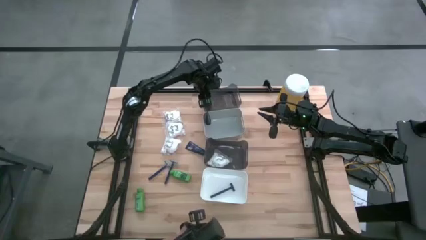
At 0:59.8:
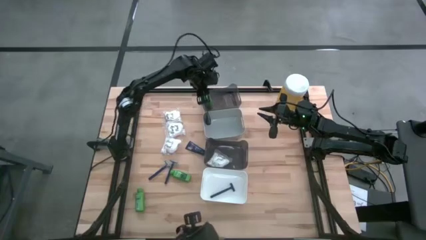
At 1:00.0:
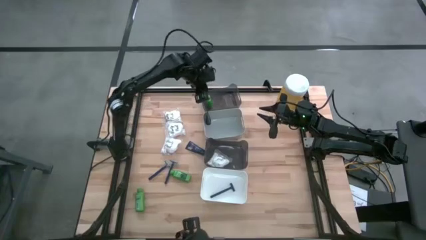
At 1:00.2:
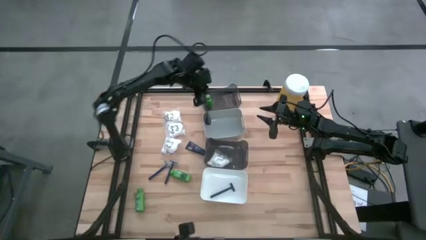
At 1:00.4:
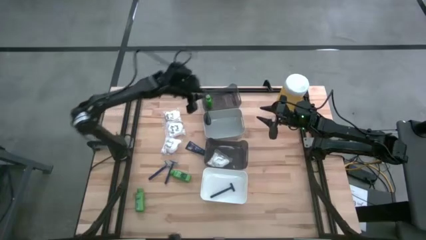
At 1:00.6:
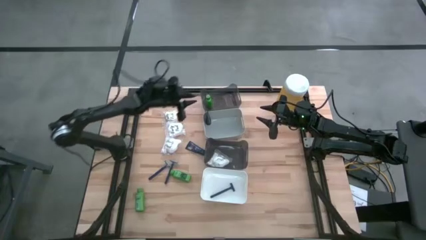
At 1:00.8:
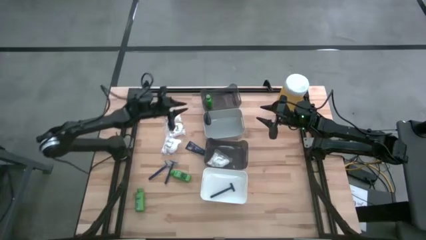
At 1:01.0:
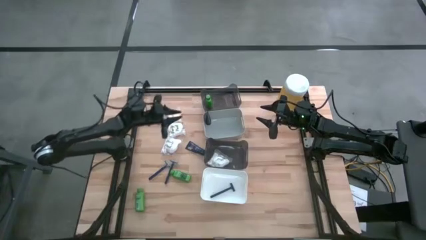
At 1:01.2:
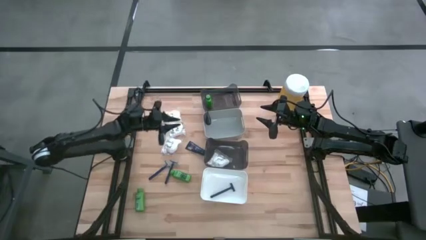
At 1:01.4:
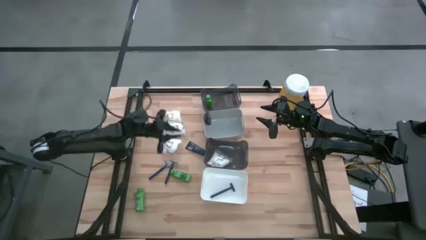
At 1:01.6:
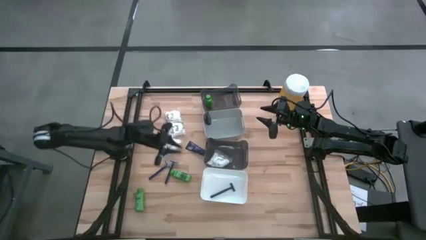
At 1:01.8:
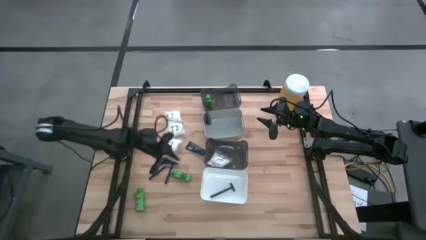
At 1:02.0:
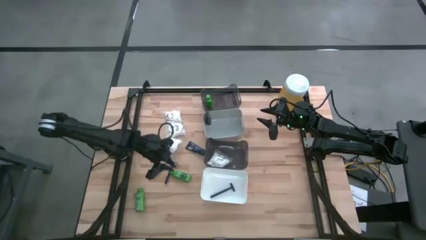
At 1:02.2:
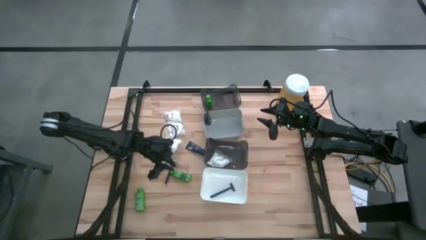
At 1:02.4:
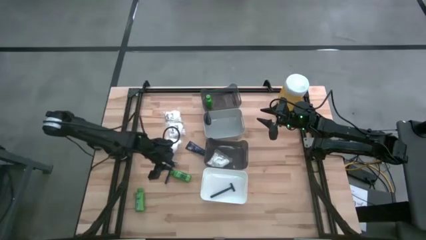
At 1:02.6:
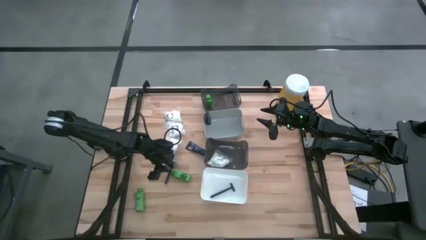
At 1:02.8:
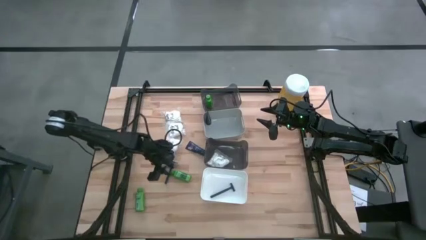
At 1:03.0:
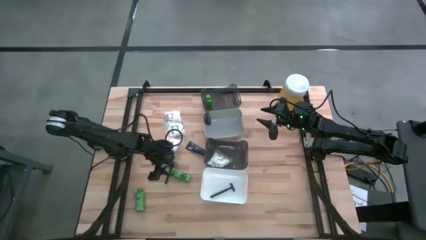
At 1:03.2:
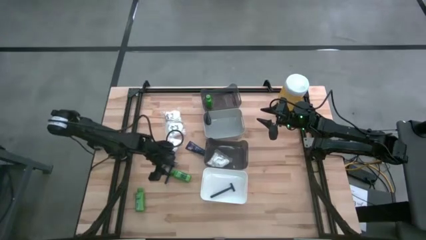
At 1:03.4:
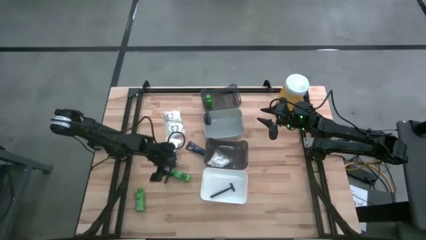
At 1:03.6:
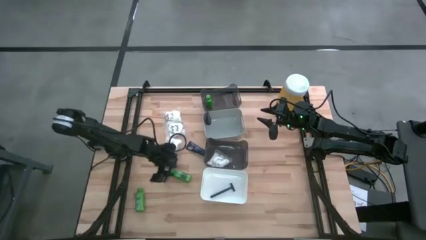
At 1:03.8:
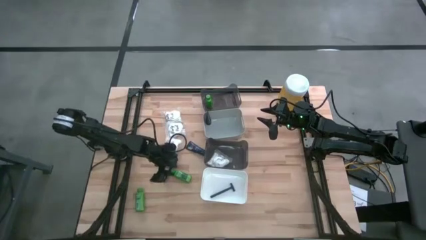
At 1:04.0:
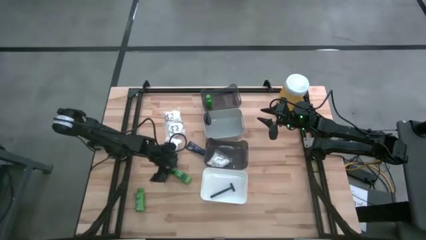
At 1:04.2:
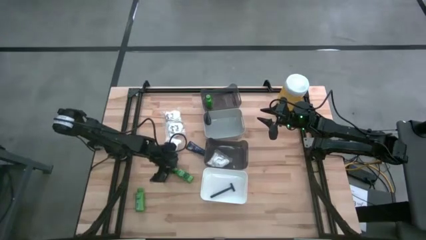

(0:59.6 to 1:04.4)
Task: Pick & Place Travel size toiletries
Put the right green shampoo into the top black bin

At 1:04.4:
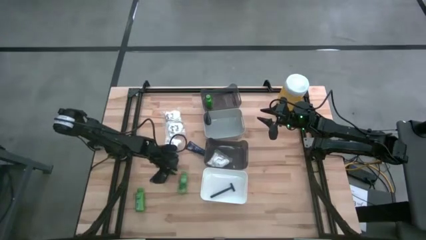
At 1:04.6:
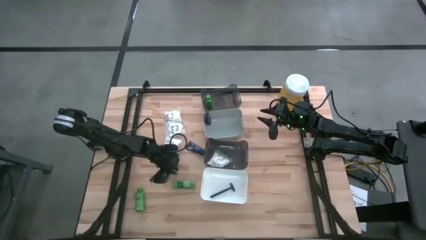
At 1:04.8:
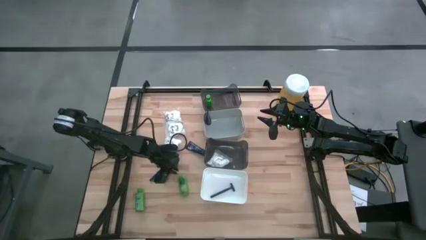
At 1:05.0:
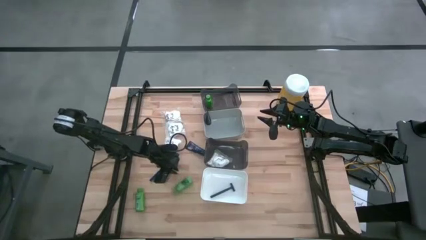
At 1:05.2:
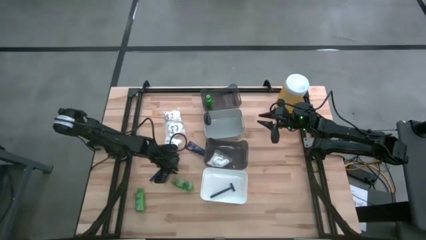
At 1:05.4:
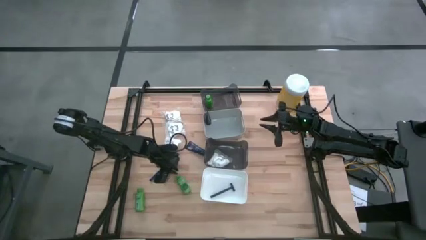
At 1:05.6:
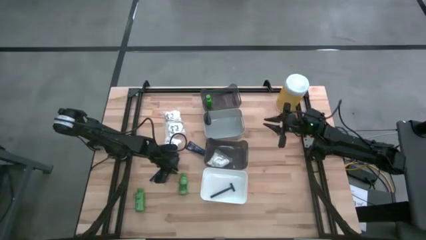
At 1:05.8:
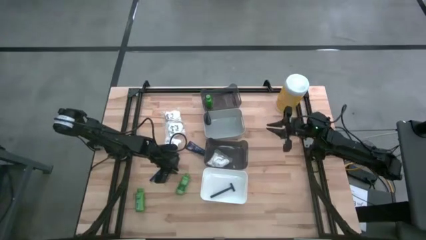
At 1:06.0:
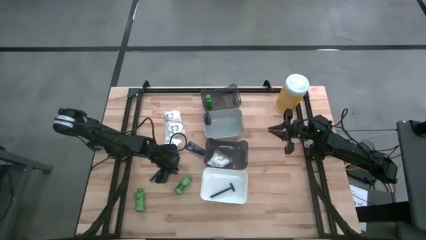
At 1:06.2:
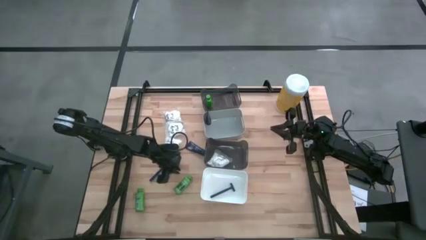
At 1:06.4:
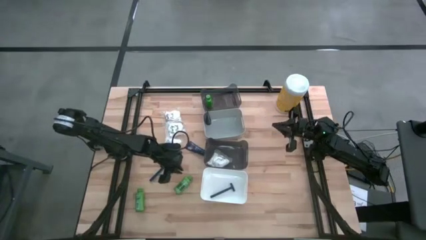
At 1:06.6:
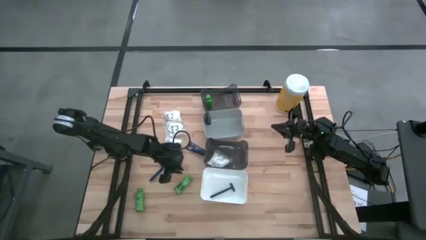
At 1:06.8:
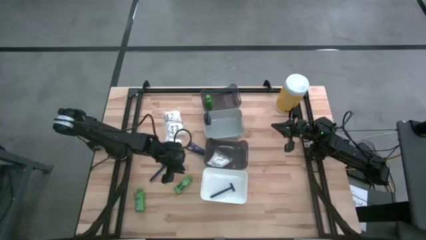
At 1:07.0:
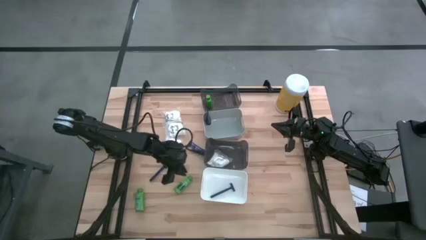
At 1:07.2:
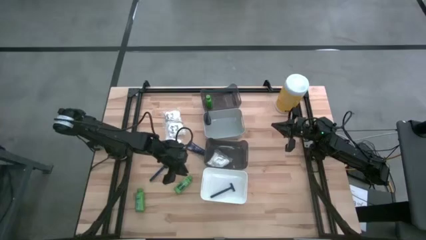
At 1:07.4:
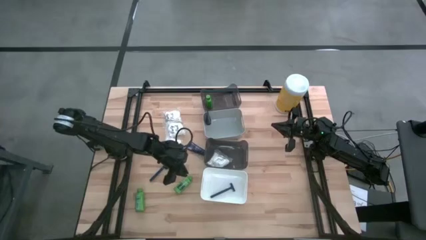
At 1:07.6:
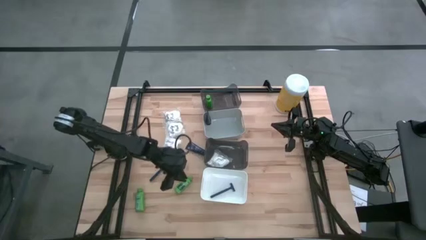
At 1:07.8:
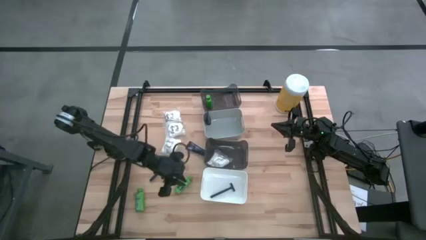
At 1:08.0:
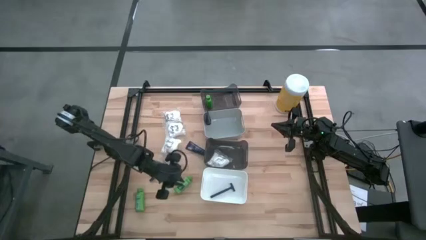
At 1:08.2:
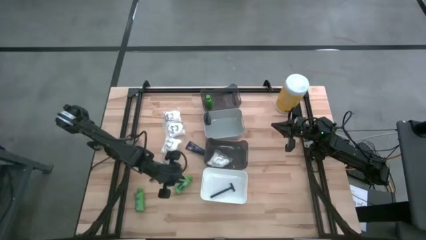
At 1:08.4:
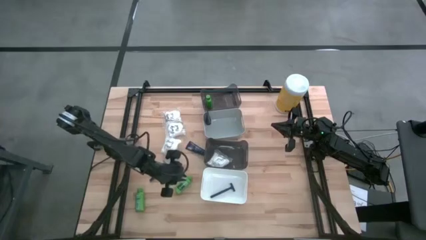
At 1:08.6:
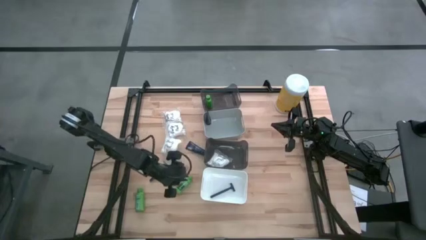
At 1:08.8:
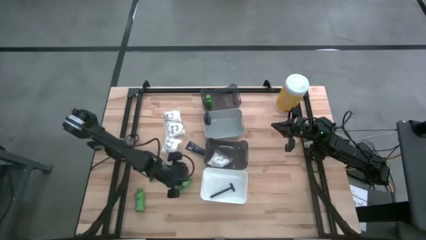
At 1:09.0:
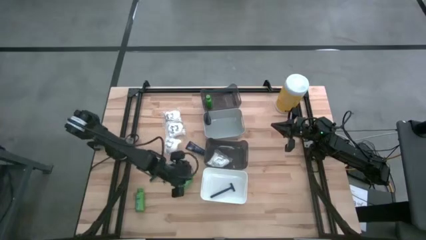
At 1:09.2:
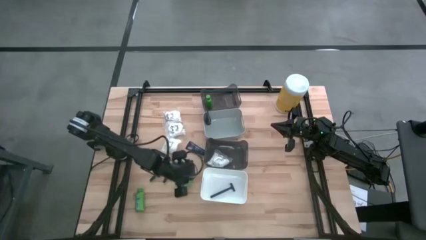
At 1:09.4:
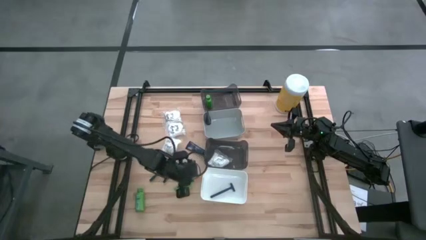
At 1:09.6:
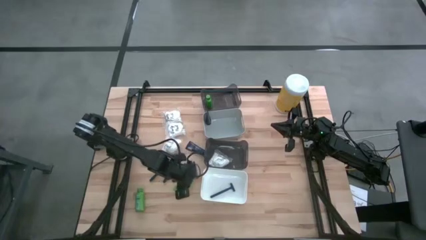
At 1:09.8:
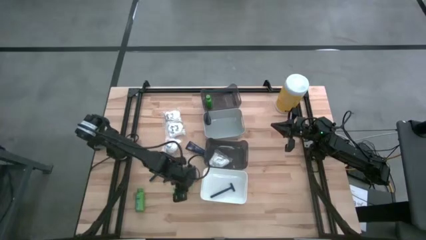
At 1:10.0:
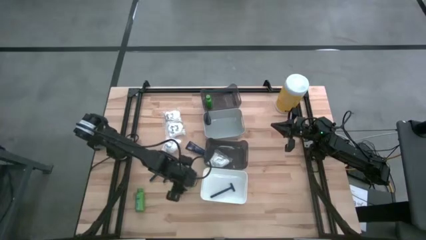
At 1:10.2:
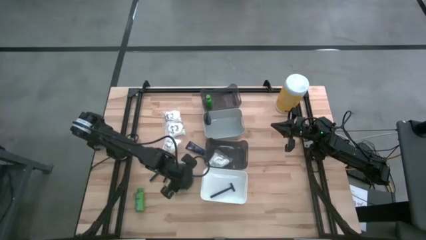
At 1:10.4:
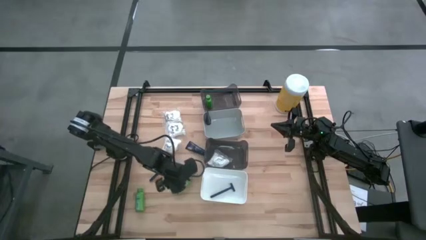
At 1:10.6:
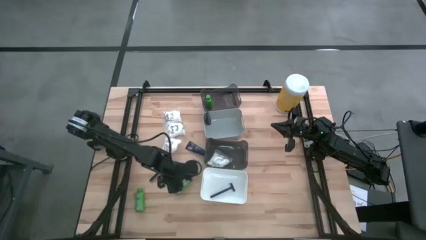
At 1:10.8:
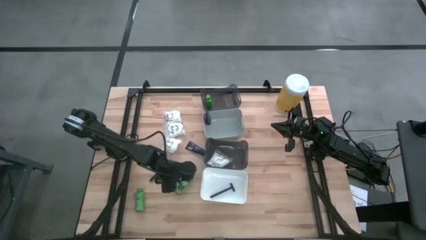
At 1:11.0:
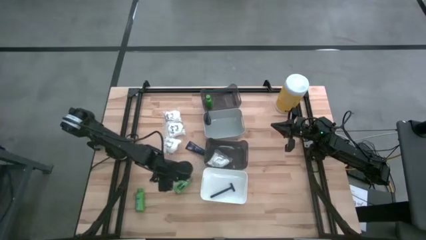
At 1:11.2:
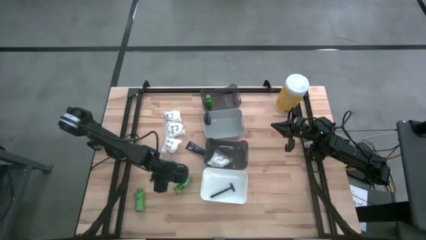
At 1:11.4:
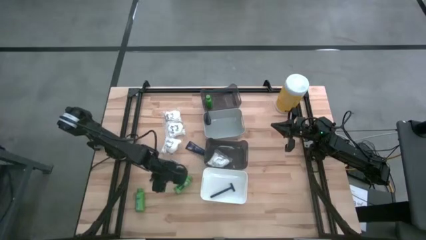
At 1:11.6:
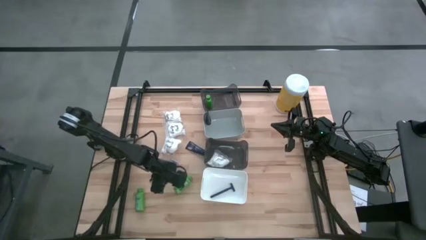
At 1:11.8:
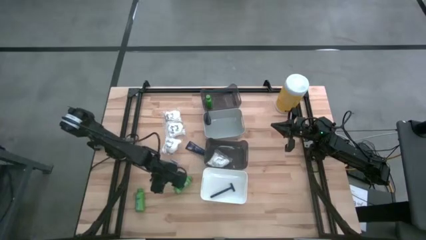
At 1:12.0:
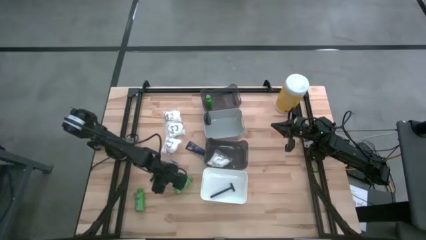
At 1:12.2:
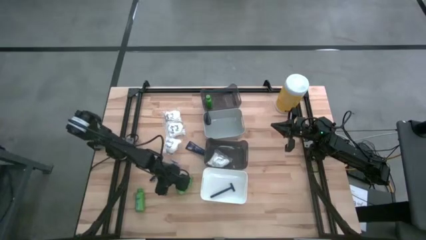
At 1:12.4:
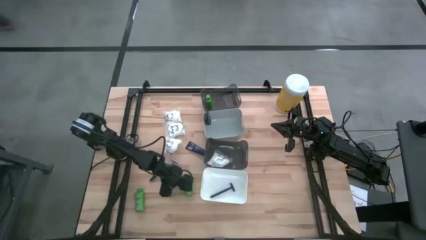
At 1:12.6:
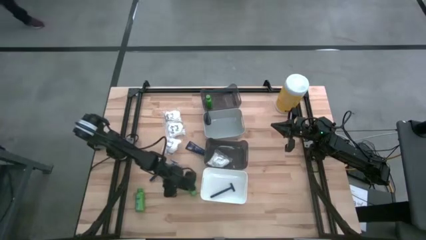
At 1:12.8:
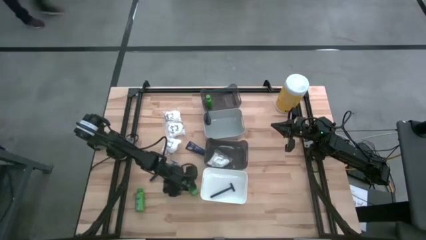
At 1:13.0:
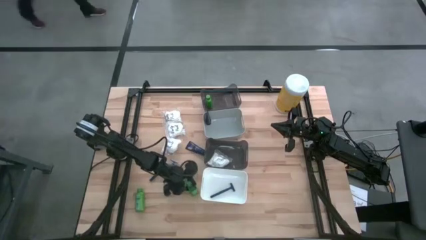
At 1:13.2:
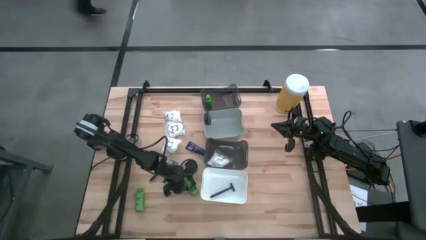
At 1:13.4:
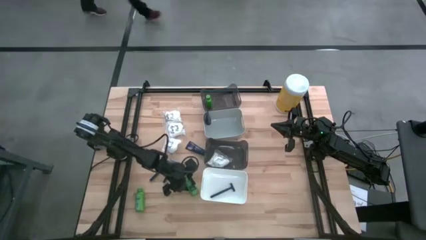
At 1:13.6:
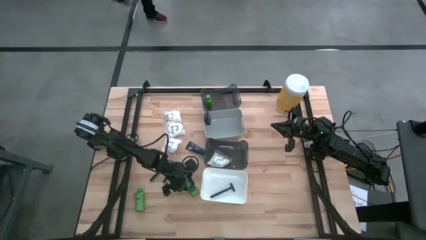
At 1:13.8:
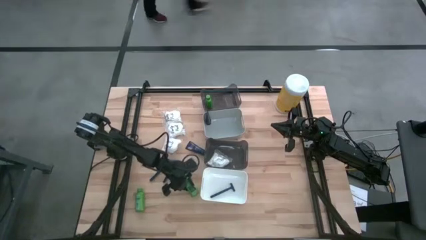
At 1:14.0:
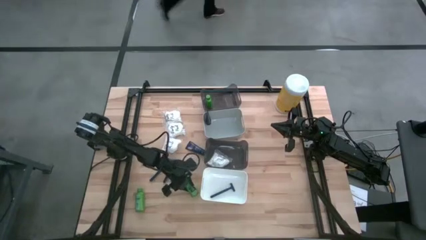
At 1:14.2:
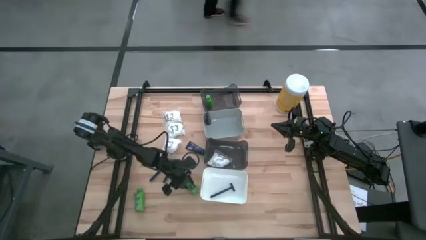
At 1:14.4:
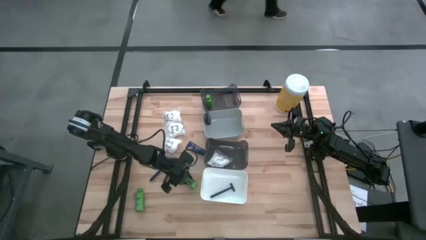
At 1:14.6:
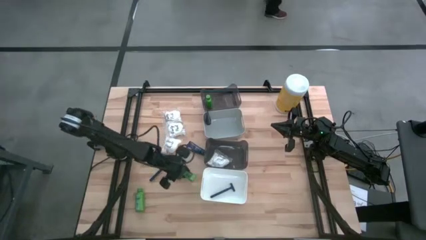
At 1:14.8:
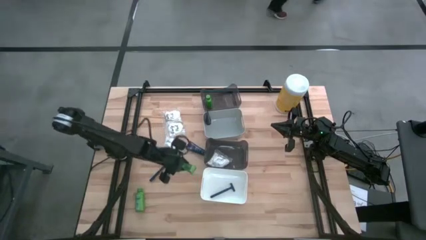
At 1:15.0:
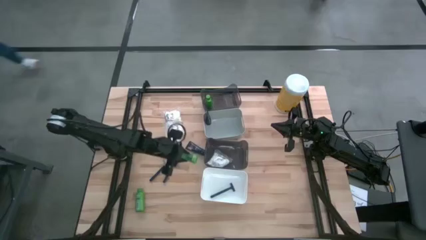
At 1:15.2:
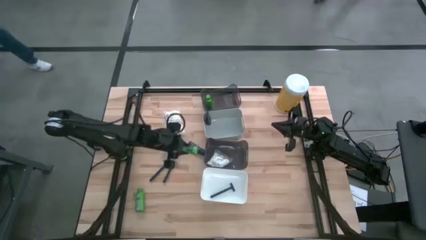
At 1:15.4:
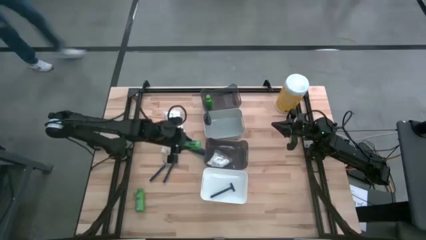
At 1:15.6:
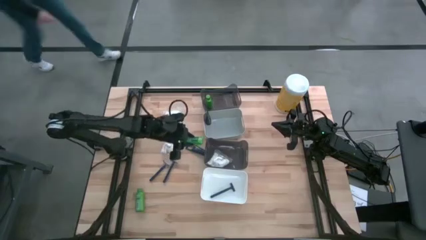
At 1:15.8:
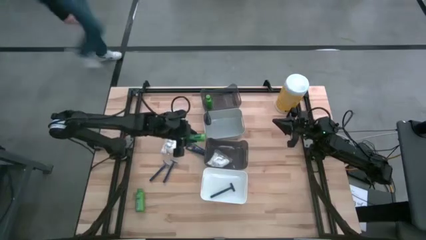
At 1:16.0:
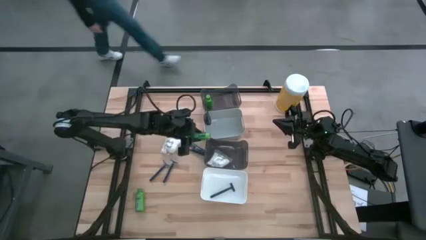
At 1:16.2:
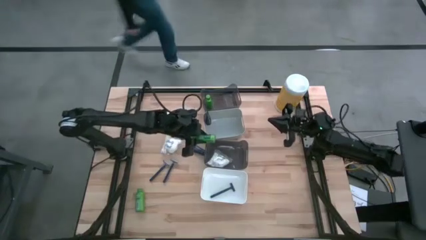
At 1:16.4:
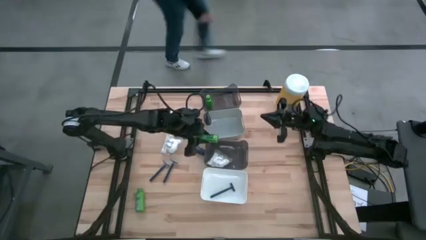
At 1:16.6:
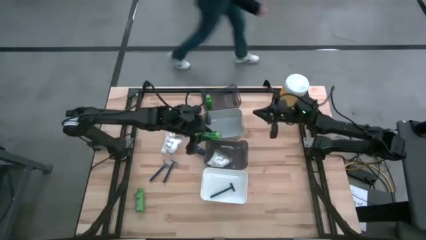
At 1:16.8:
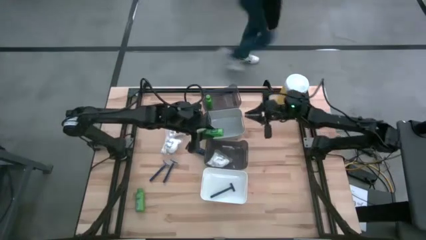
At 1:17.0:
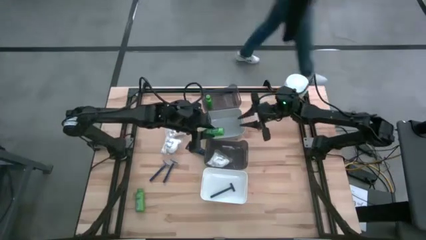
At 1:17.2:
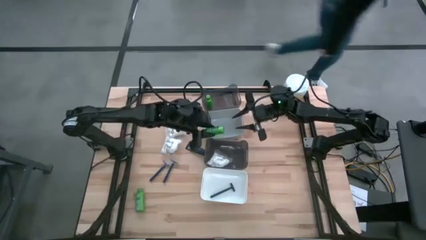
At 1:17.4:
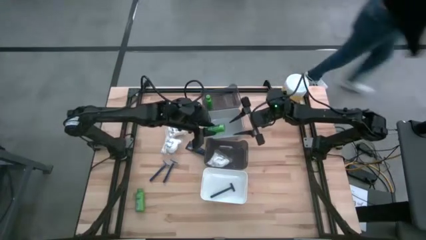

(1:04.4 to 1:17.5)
Put the right green shampoo into the top black bin
